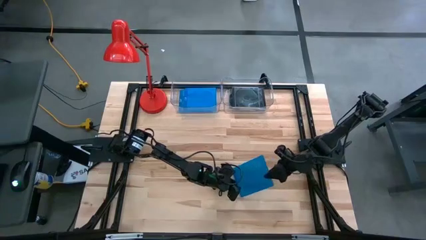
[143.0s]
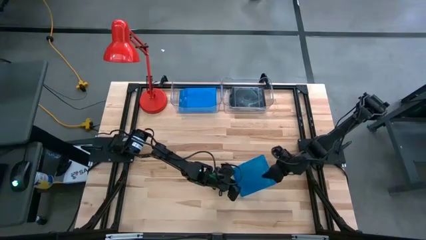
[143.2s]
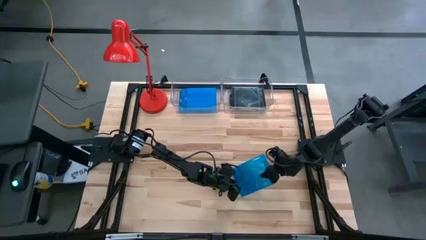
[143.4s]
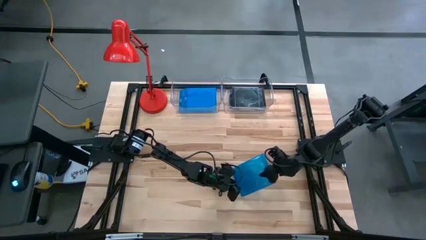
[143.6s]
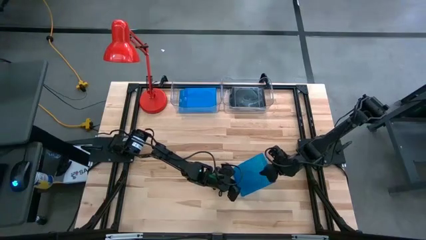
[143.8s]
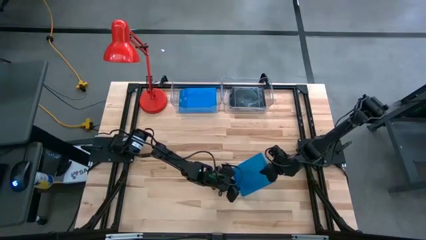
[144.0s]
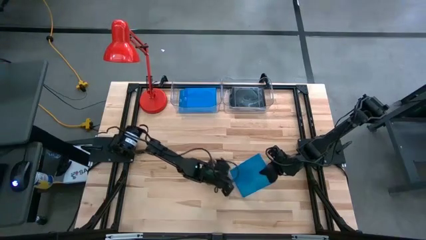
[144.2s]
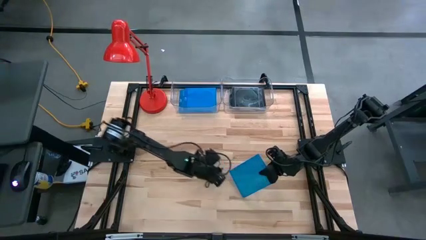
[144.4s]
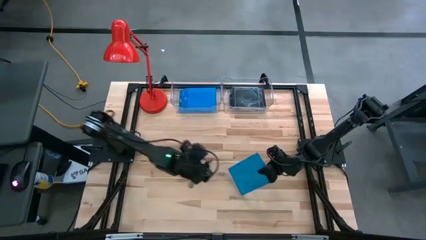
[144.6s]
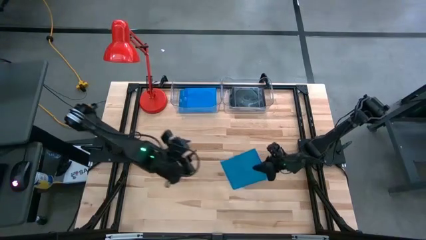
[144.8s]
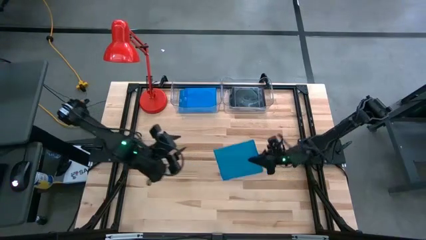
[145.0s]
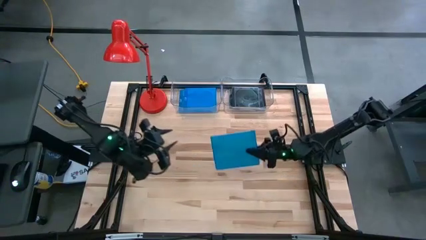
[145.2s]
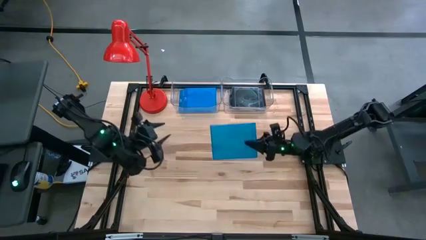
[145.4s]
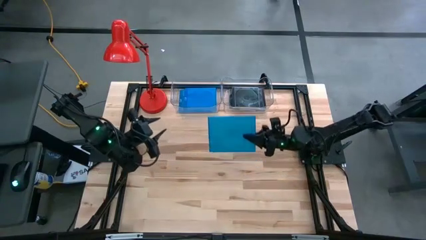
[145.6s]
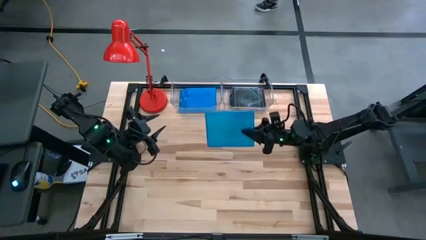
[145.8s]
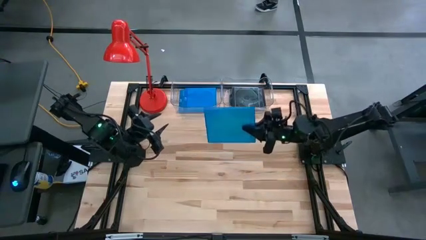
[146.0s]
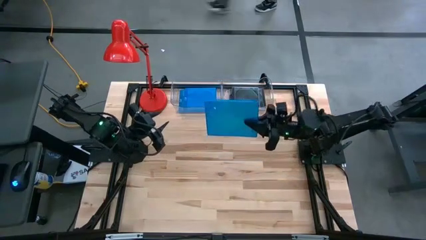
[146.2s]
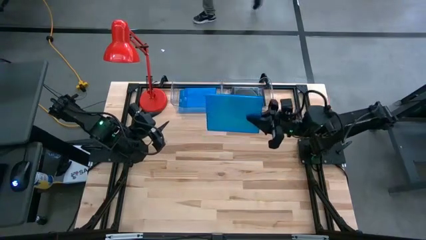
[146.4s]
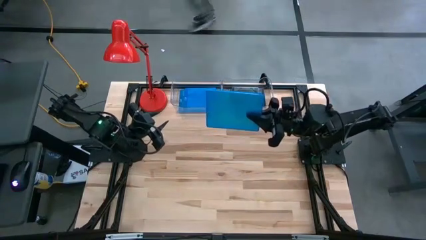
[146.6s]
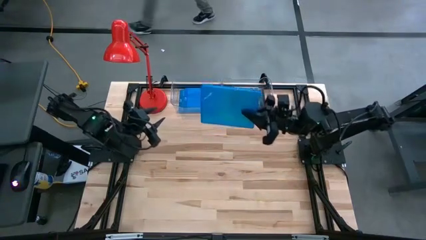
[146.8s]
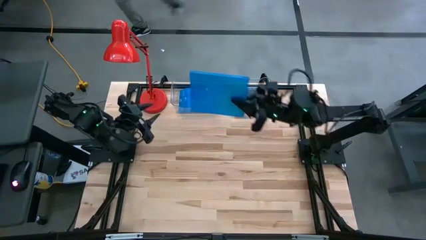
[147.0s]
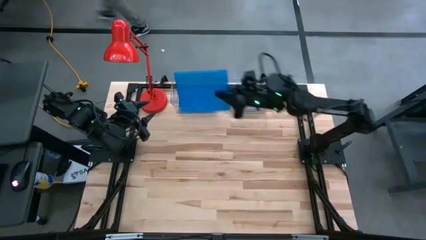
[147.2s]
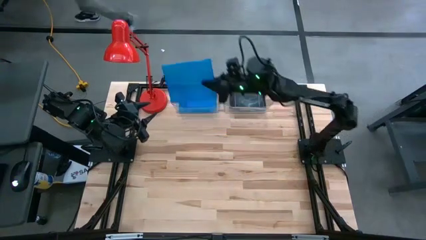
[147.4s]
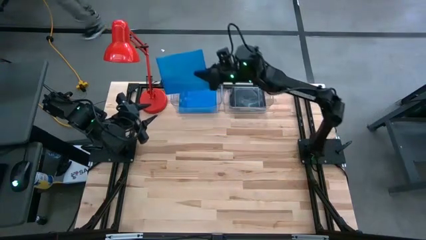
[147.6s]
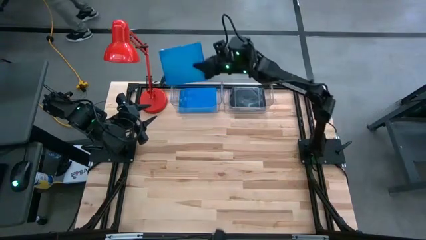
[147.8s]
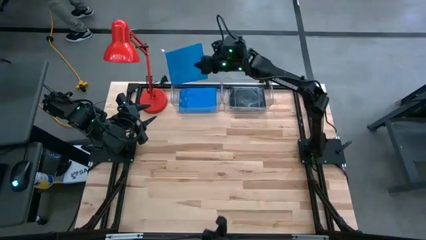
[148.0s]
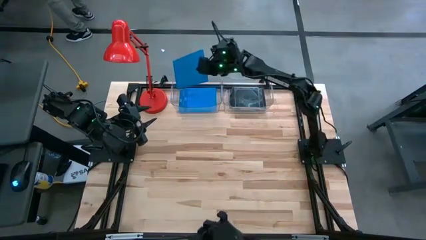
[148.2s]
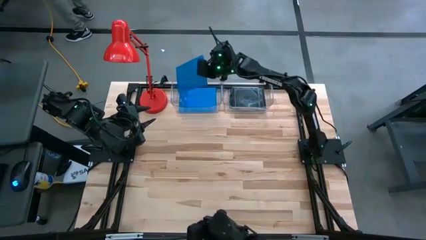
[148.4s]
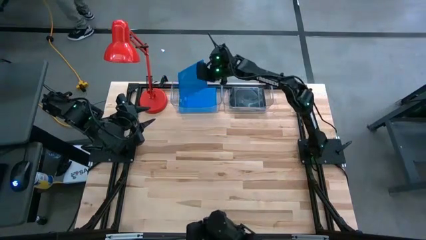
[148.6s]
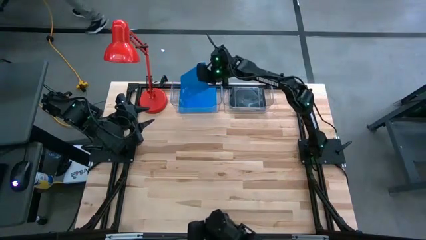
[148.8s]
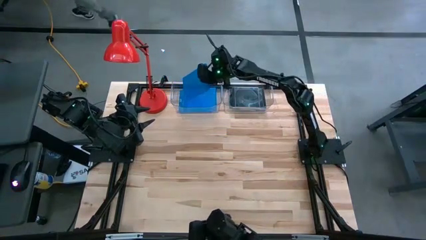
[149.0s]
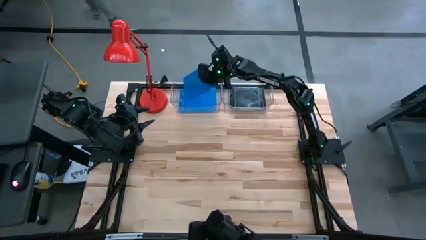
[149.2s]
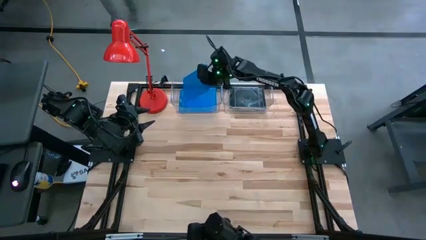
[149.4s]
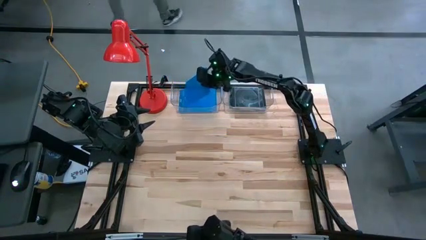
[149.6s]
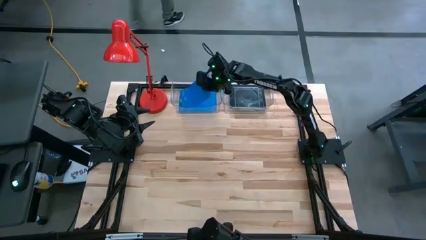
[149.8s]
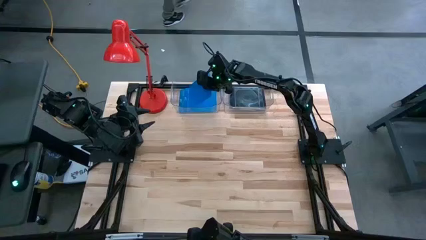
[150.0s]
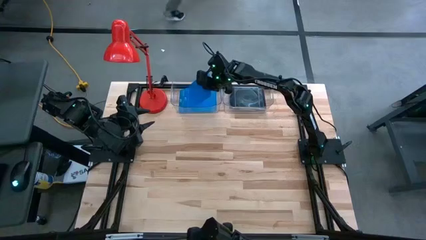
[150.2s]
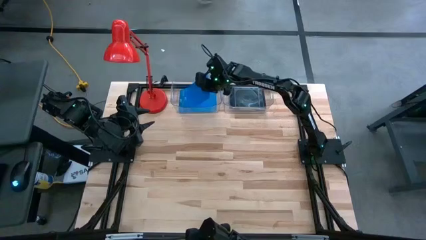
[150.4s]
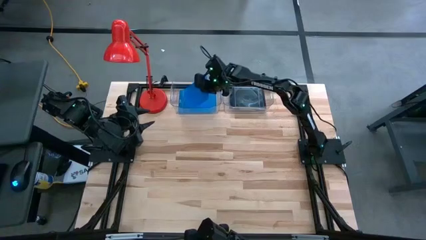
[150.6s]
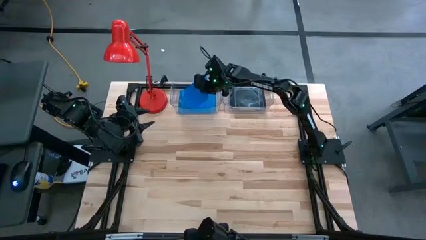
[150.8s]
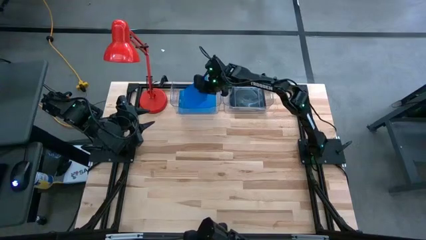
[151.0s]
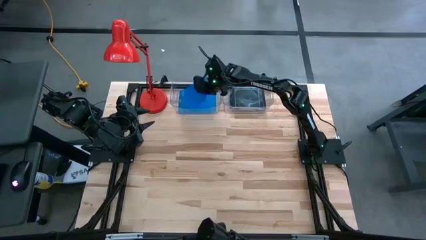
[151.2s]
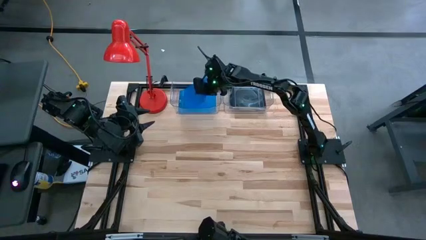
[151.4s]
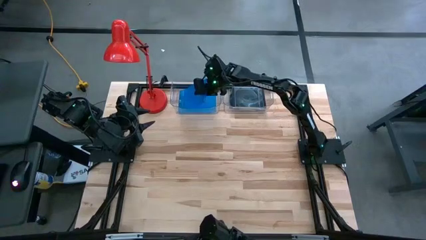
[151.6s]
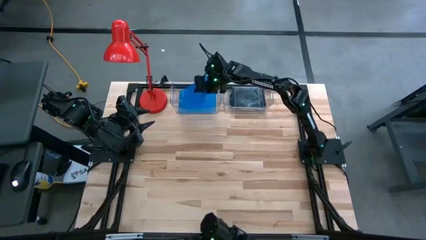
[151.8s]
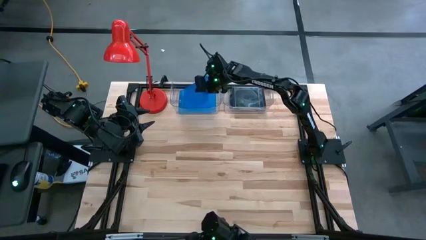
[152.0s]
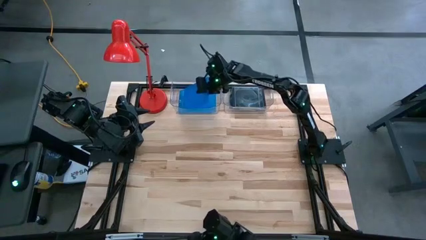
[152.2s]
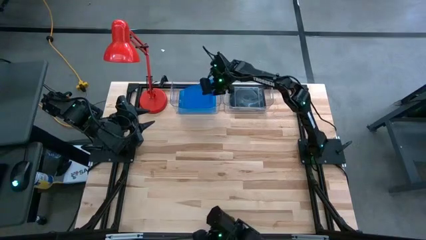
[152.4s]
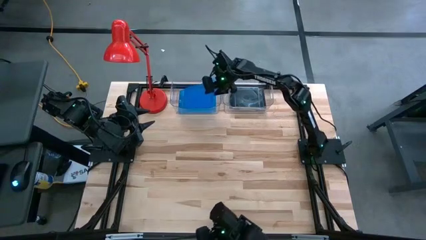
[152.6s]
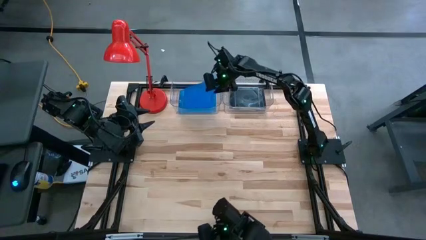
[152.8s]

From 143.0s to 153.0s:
Task: Pick & place jewel cases by type
Put the blue cd case into the left transparent bin

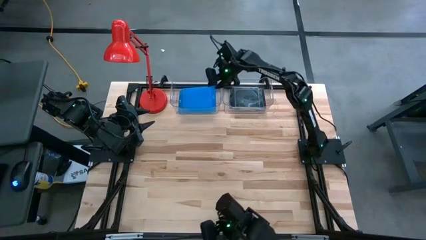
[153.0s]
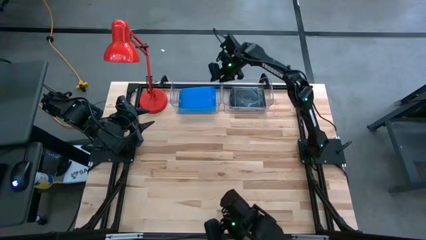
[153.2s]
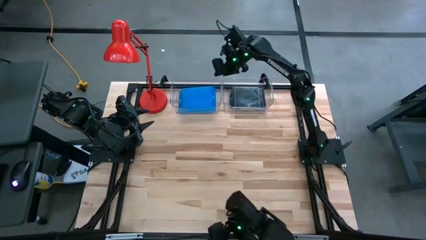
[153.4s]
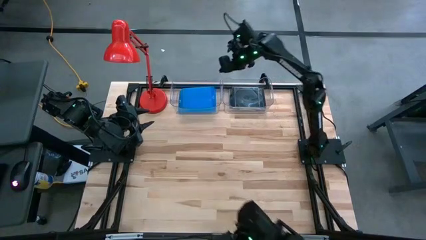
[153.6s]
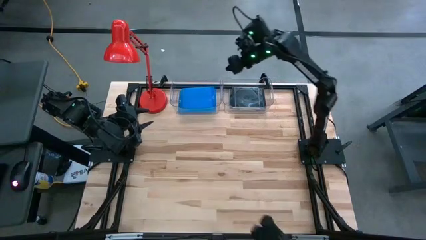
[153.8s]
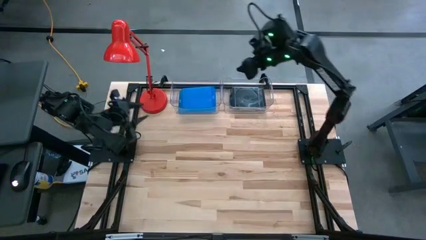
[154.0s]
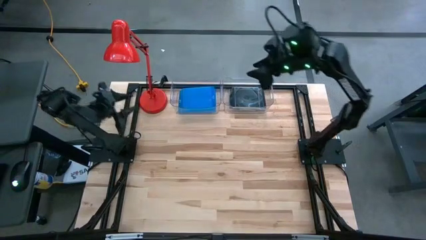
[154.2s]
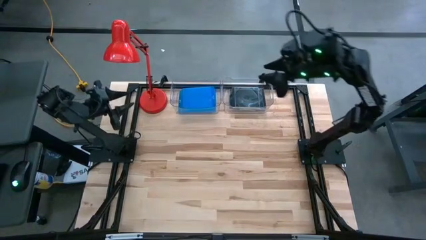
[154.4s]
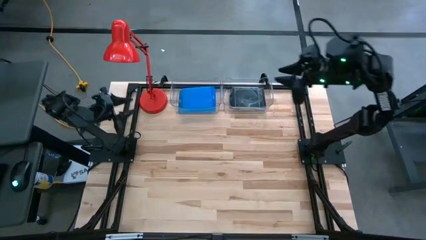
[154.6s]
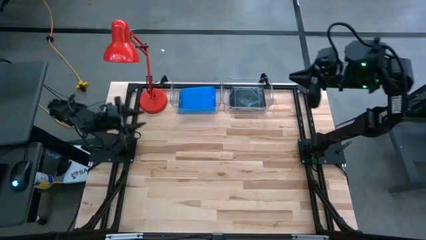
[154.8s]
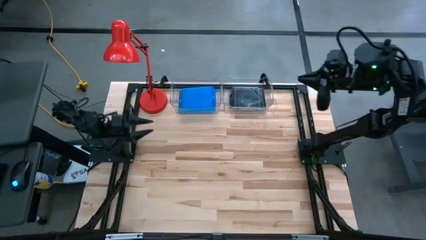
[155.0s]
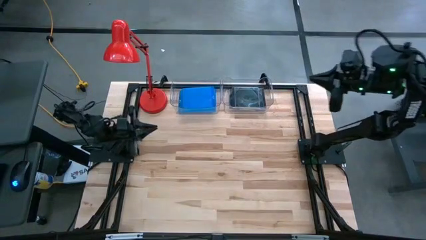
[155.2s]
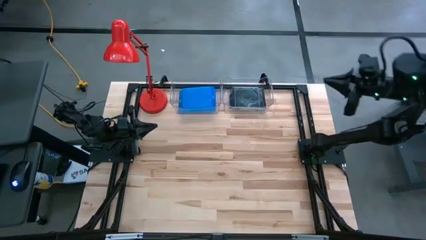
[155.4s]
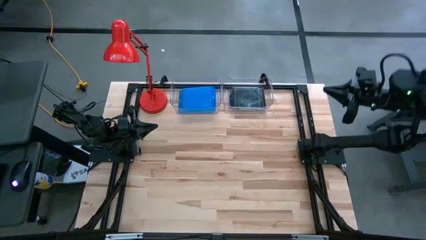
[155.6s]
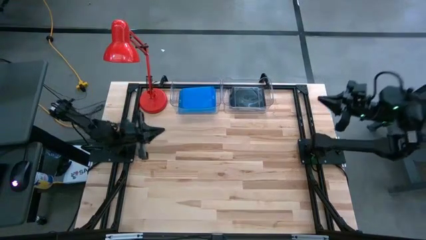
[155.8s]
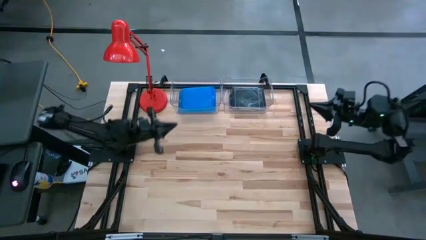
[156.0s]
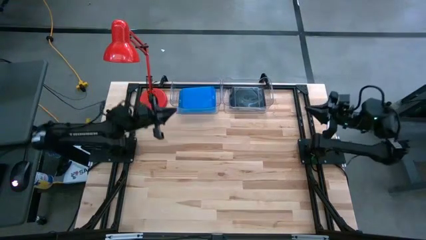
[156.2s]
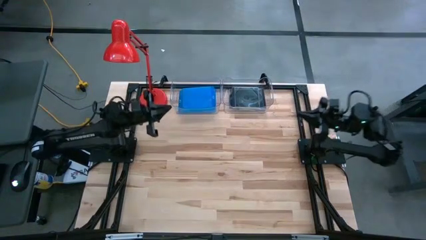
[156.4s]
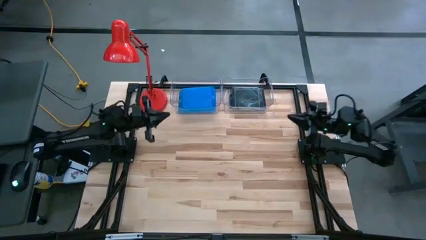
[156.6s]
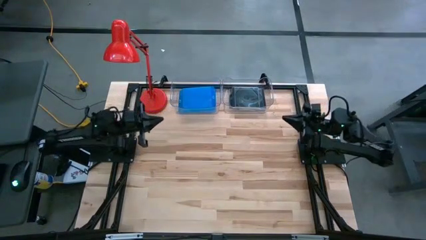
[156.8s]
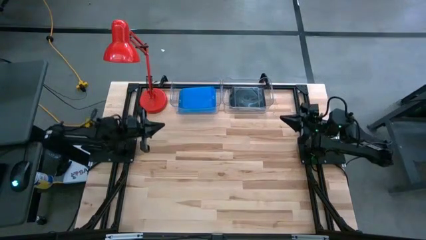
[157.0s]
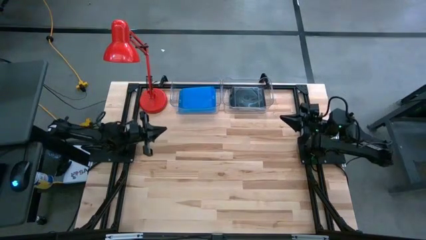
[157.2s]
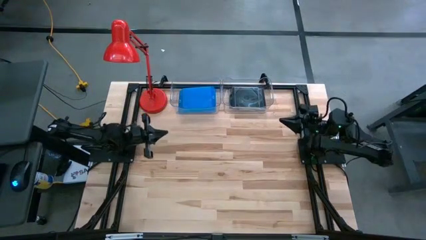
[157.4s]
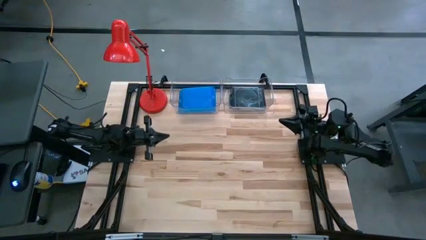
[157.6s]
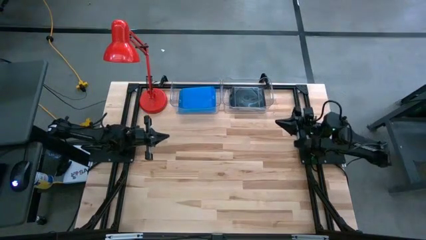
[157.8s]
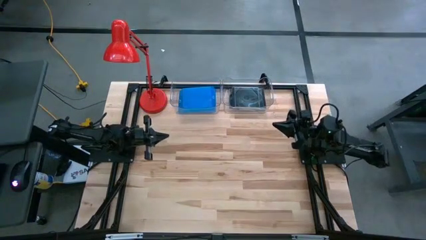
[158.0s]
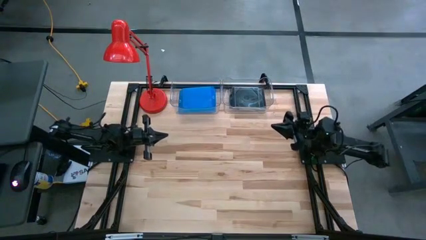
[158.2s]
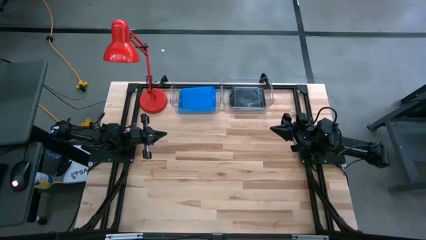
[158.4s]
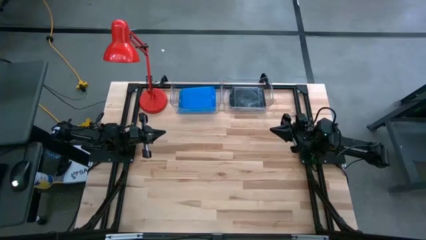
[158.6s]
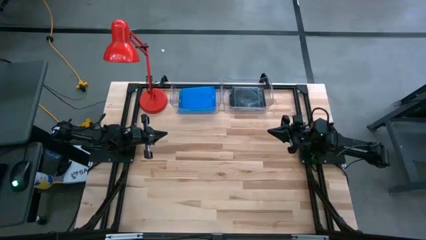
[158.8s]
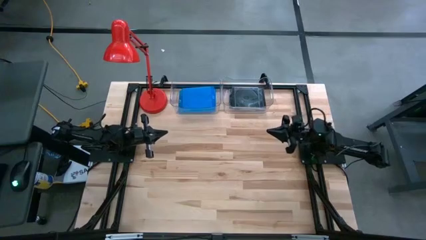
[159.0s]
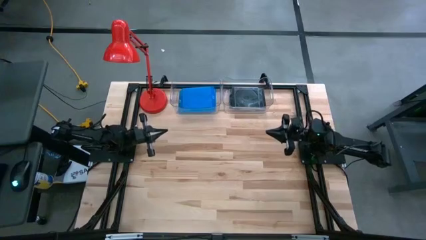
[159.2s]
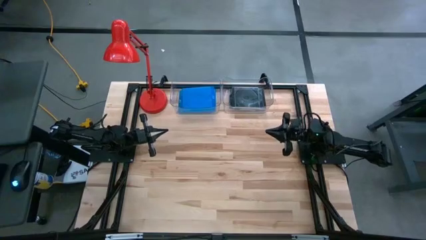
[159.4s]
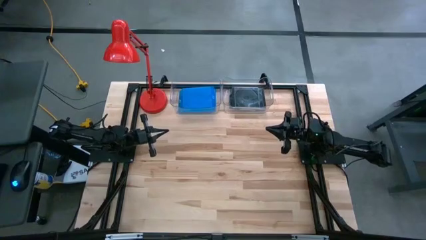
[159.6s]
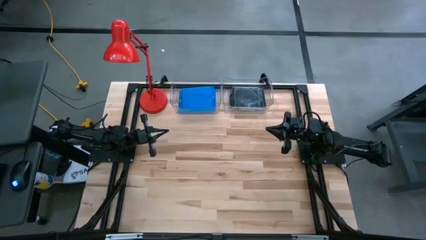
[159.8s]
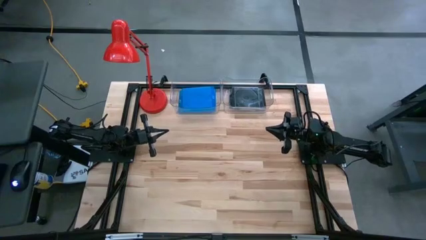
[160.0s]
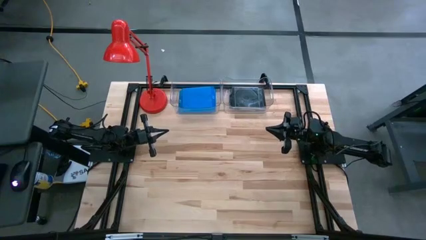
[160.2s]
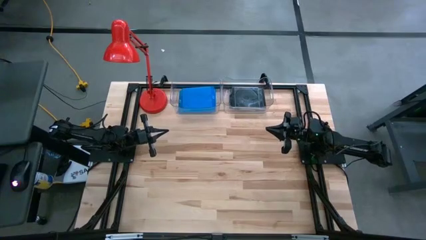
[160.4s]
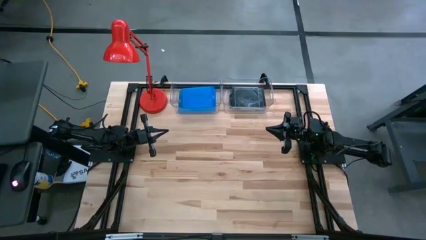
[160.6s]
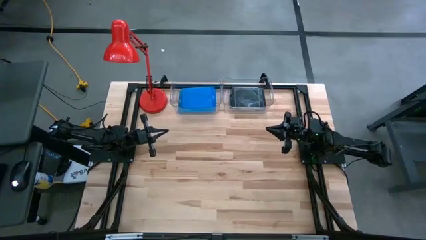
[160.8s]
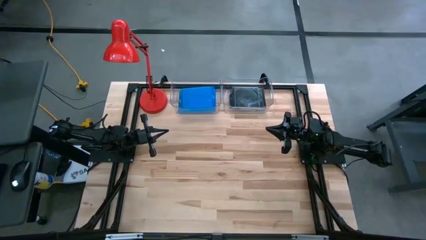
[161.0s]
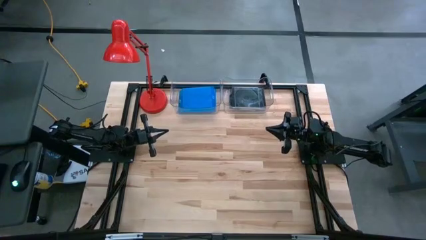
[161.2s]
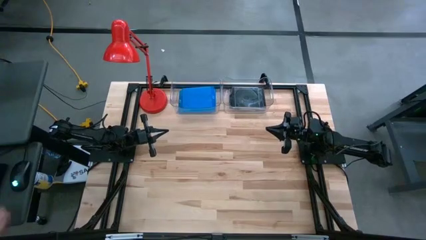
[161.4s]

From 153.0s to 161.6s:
Return to Home Position
